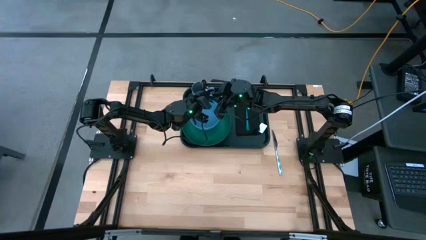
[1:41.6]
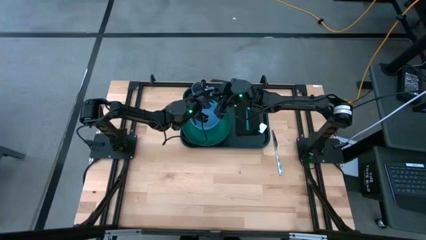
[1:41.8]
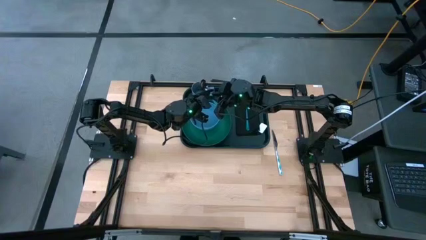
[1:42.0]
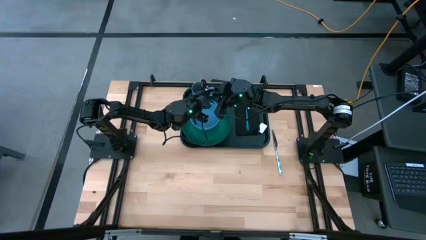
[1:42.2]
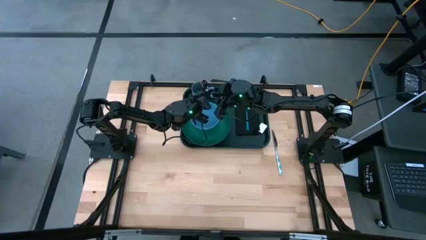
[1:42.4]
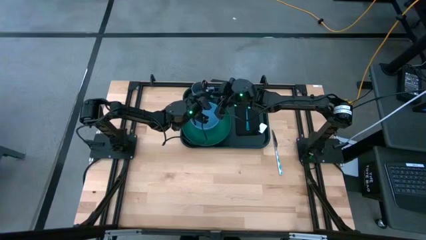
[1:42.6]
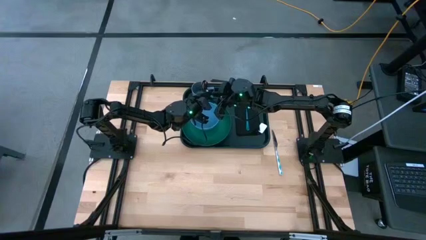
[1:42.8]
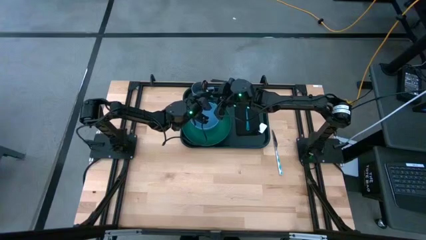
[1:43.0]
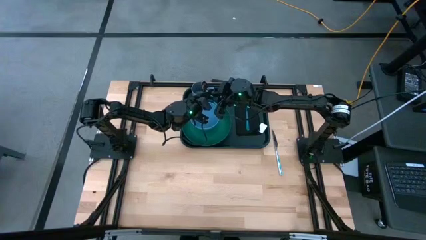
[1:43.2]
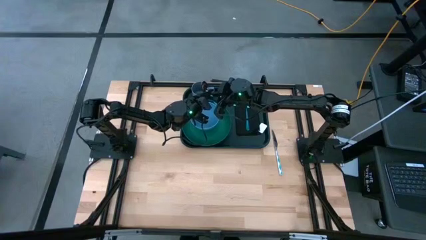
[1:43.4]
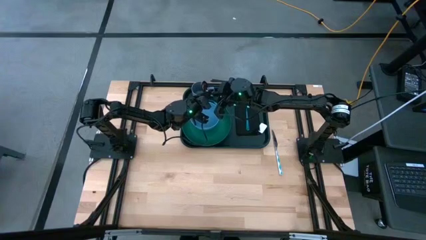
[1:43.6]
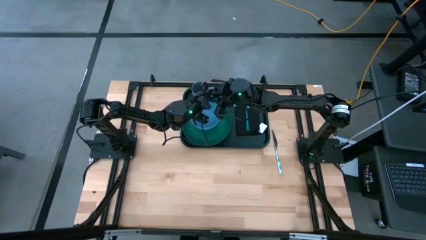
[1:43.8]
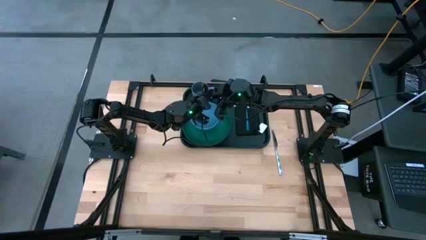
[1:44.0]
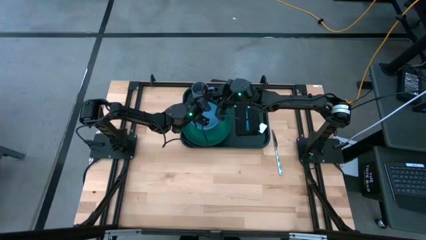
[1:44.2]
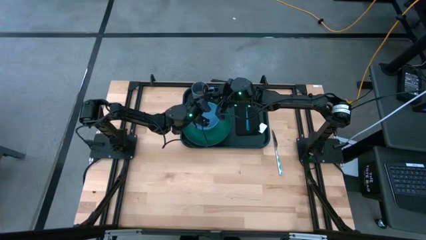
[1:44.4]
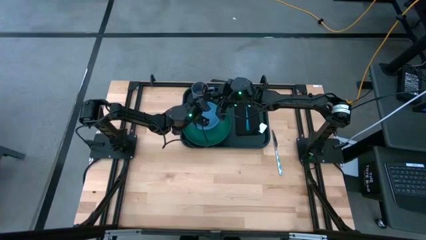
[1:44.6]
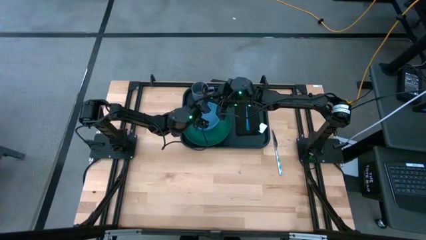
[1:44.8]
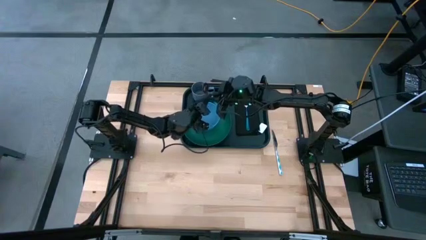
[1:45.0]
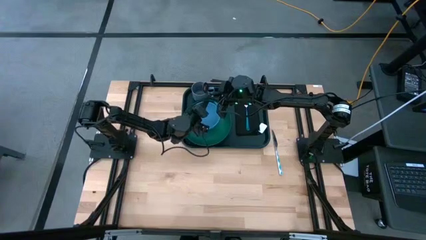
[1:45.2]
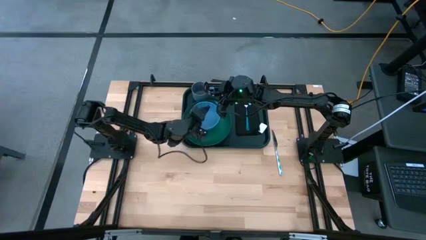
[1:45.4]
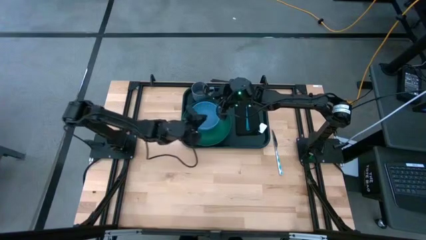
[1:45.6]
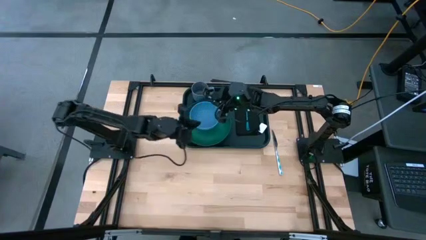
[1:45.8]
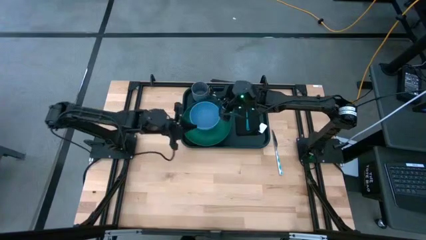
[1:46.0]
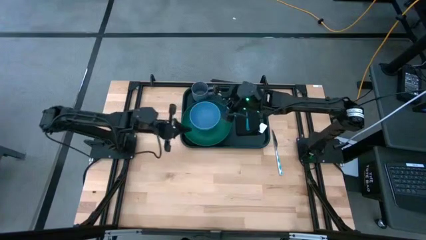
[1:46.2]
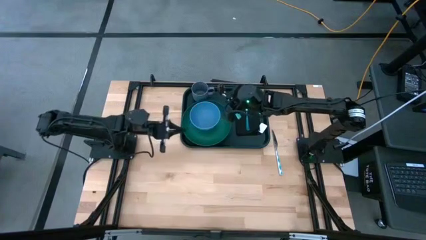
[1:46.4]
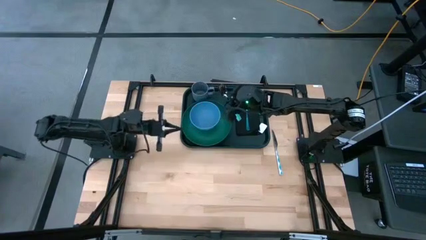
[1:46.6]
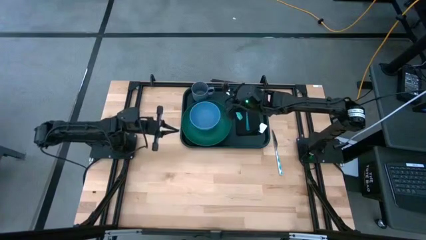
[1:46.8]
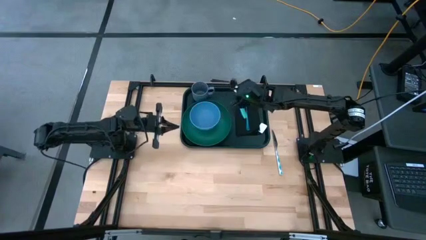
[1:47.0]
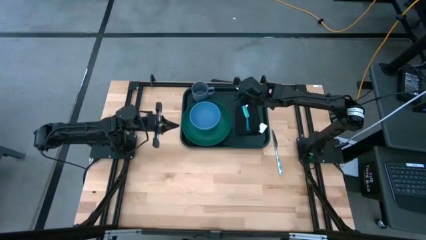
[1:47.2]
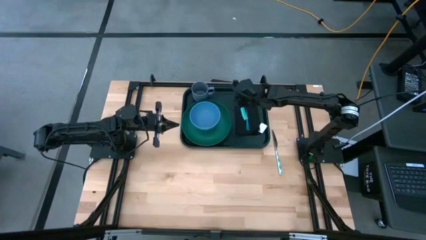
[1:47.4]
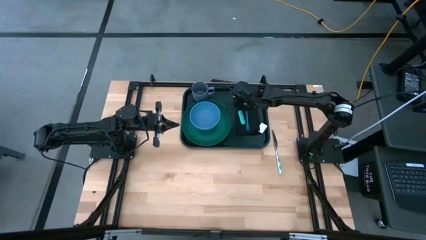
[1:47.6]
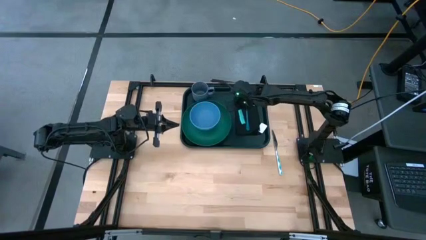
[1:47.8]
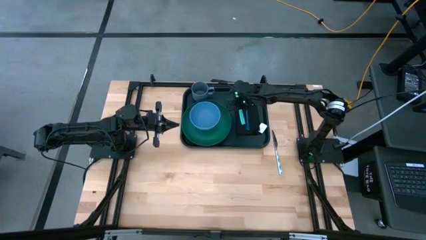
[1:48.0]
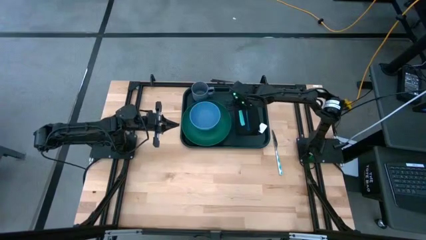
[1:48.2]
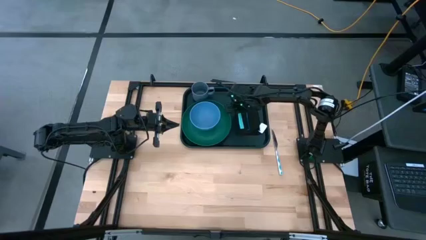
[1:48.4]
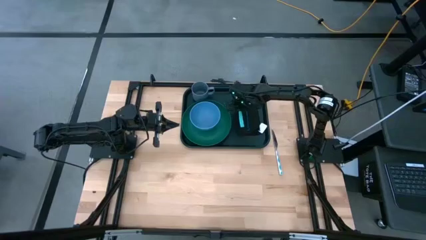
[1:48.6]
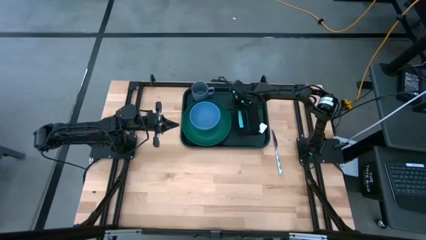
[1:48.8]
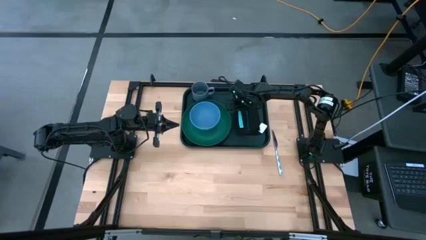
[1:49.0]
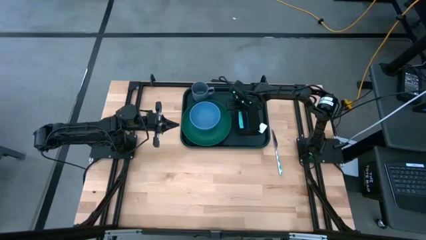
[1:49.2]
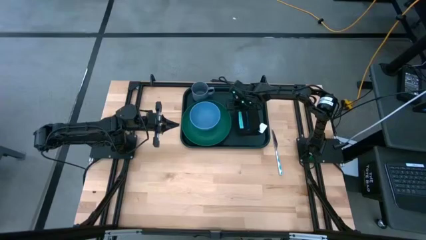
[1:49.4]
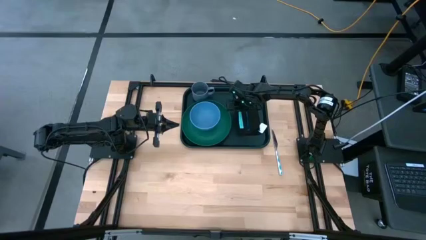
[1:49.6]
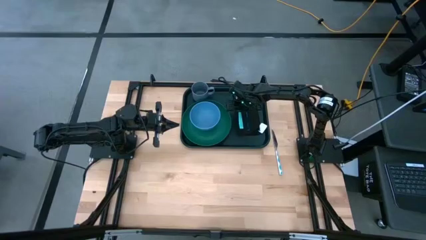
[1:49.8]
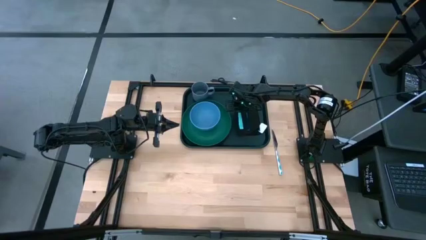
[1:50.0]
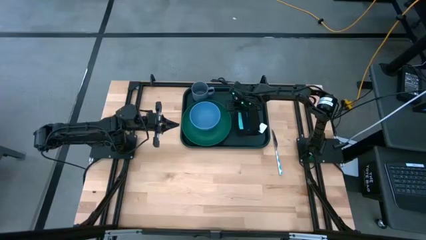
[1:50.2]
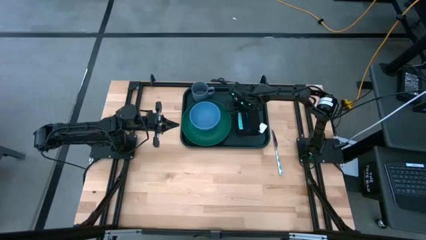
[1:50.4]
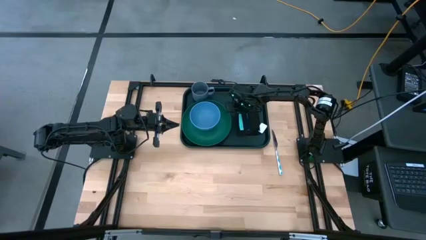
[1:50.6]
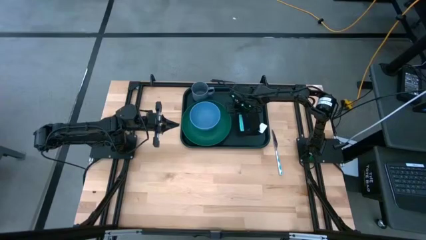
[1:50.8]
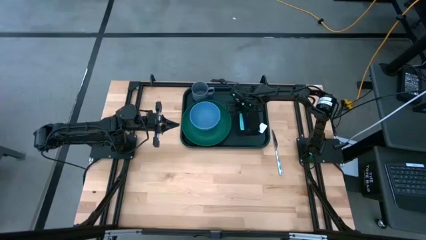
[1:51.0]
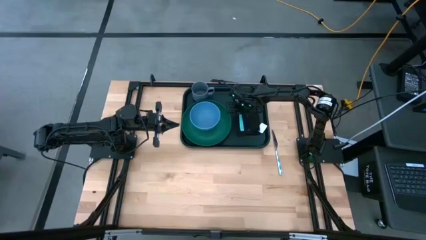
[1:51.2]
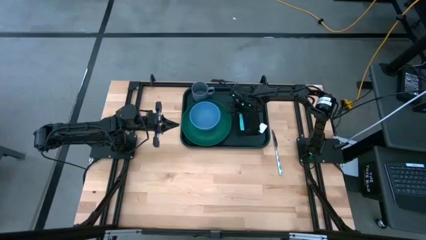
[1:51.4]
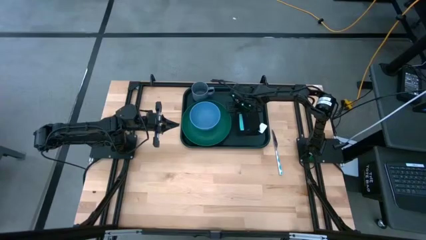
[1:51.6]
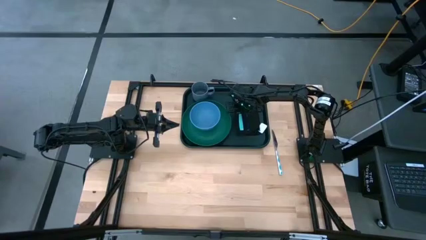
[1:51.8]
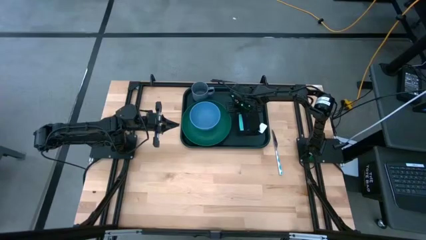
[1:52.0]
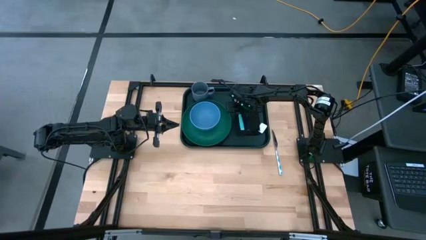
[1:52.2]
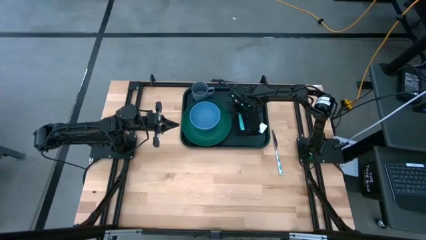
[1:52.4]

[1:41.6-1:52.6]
Task: Set up tray
Put the blue spoon to the left of the blue fork on the black napkin
